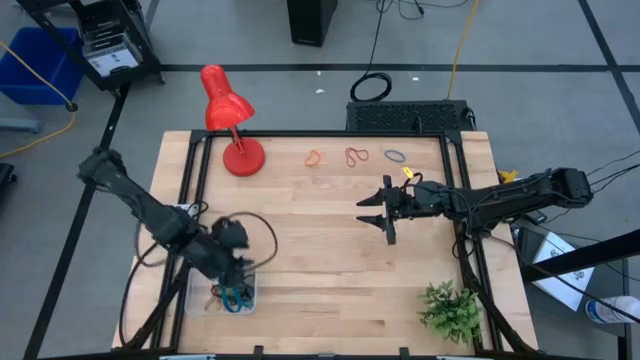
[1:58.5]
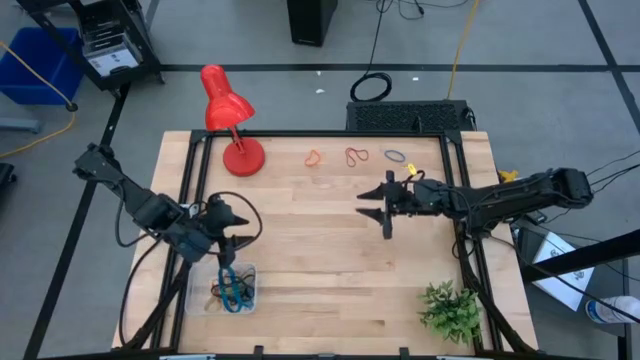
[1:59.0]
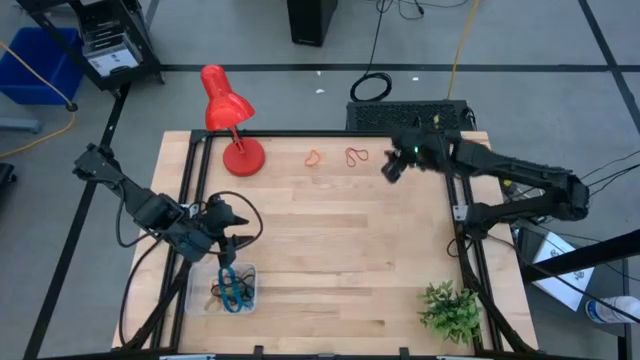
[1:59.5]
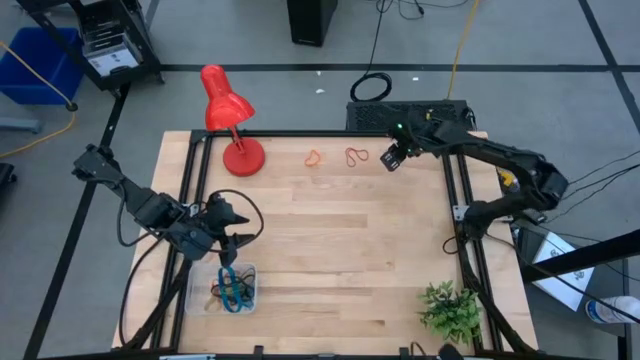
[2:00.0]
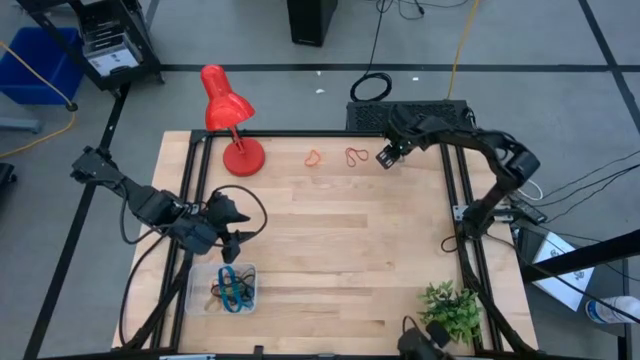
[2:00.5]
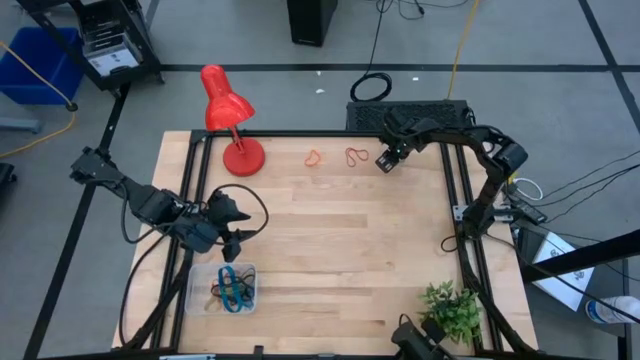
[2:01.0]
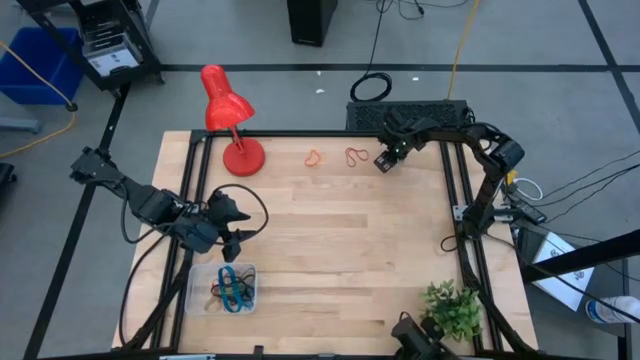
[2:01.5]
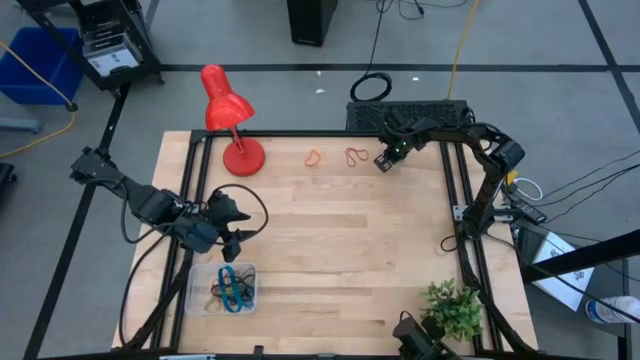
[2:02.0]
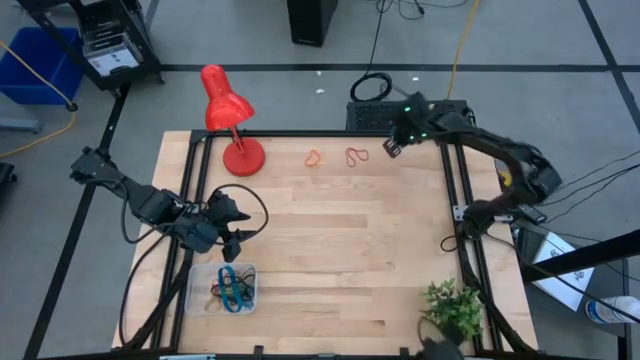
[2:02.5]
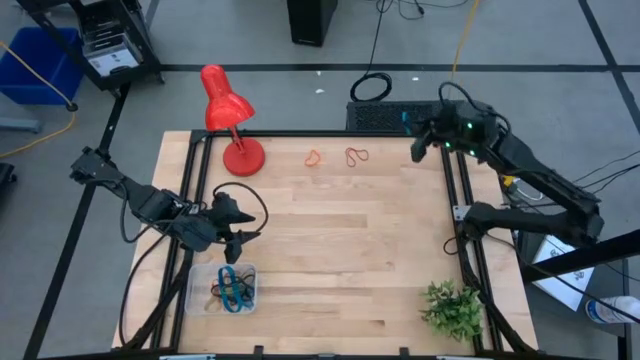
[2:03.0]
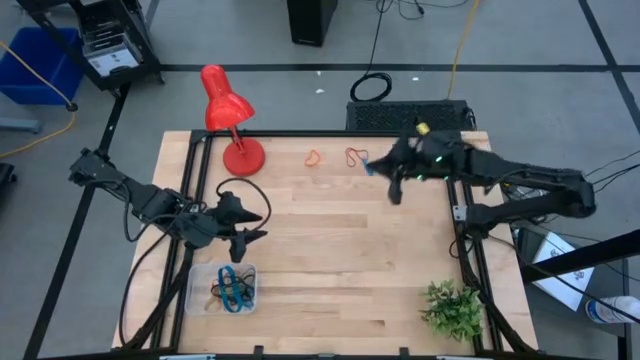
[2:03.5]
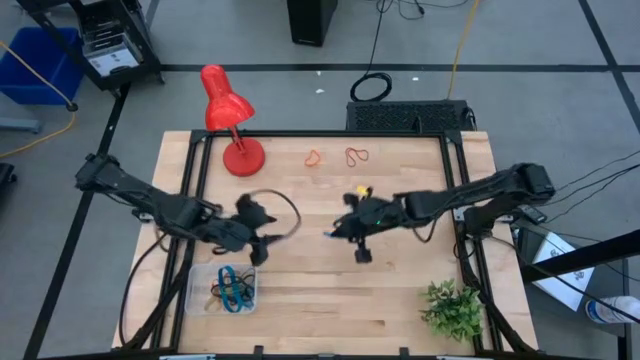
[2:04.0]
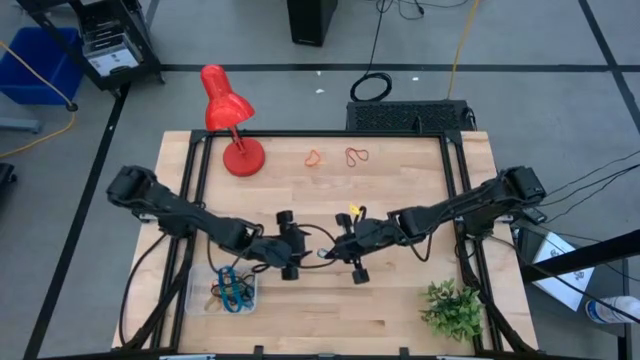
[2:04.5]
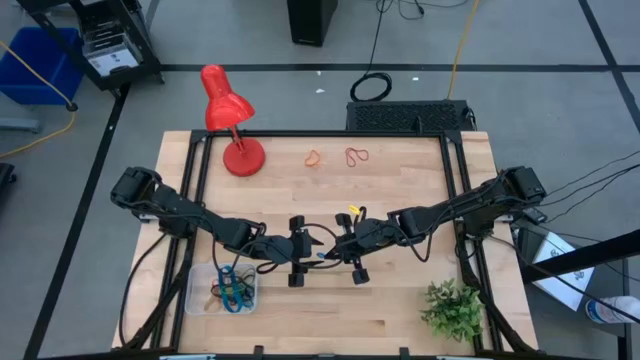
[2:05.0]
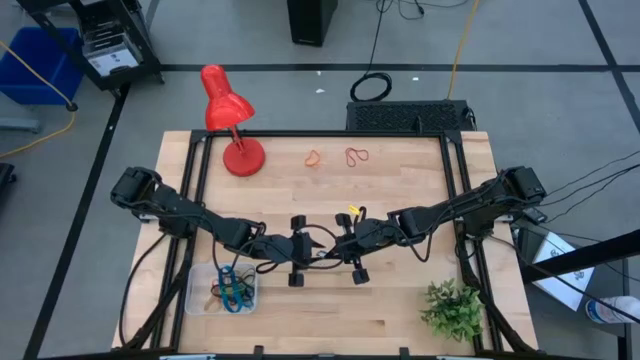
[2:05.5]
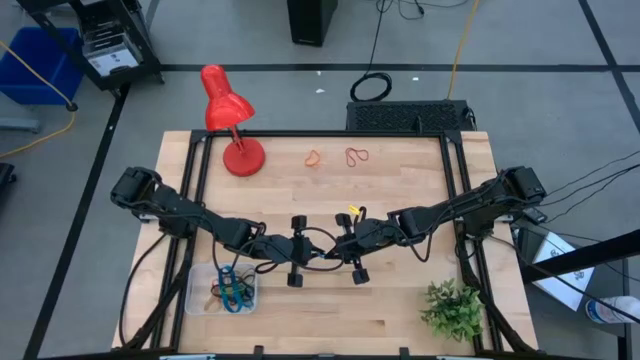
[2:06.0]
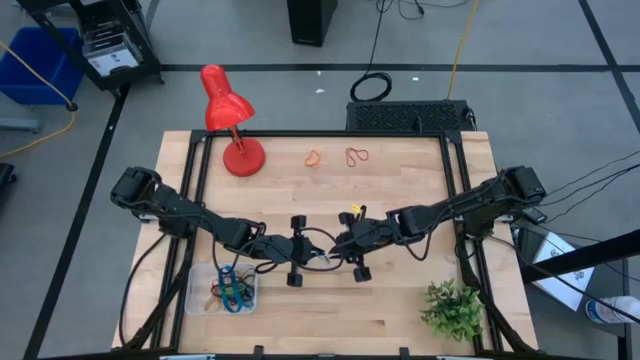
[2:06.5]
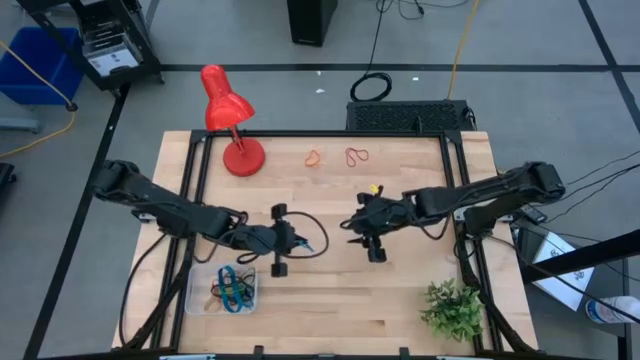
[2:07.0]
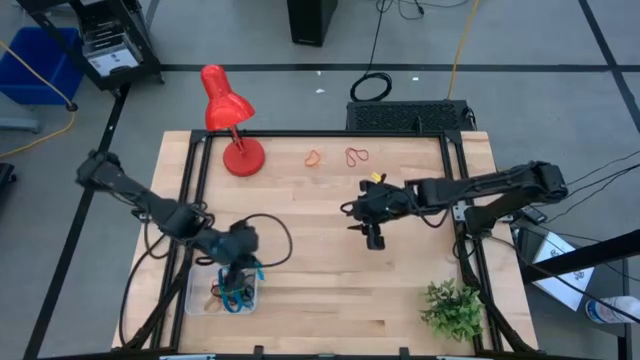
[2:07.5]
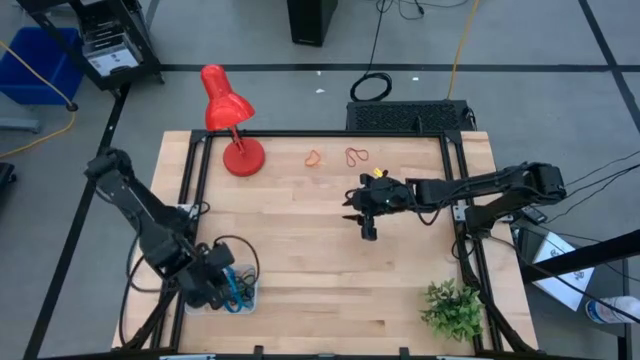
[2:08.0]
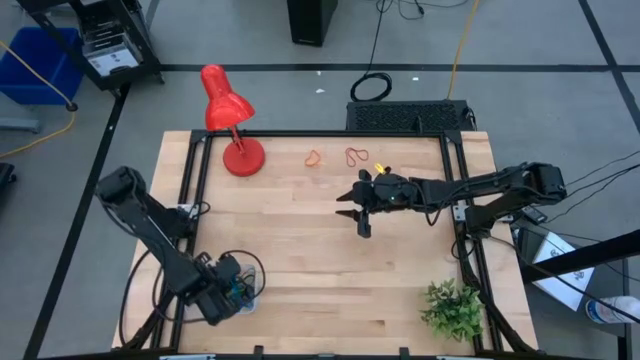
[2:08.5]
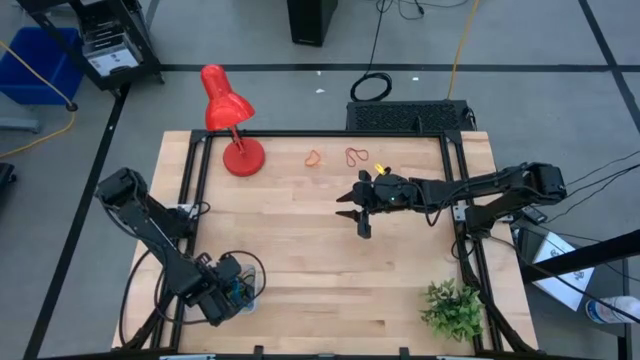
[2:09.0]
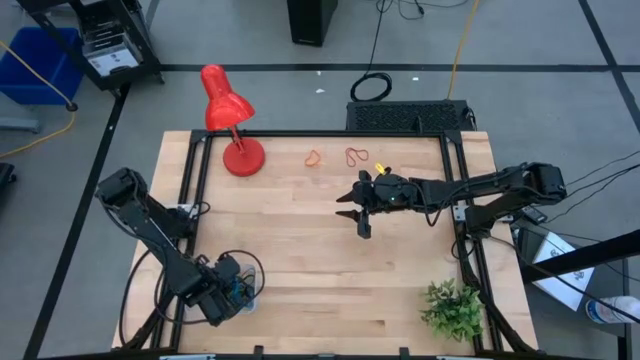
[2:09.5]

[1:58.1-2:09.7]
Task: Pick and place rubber bands into bin
Put the blue rubber band into the transparent bin

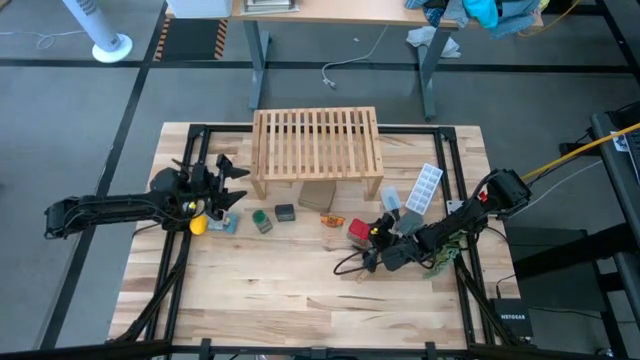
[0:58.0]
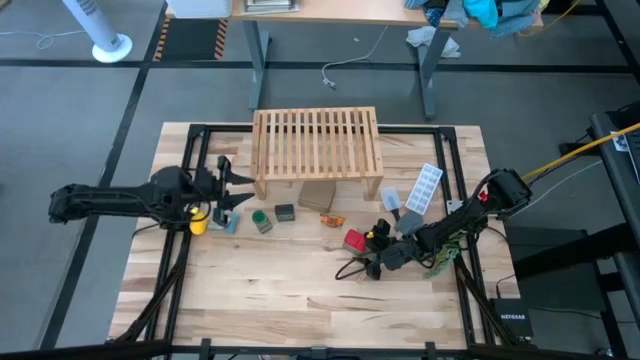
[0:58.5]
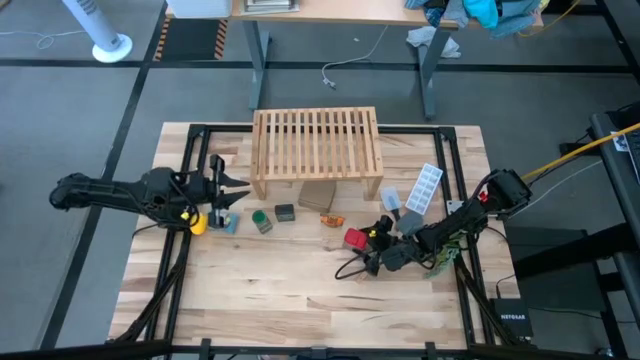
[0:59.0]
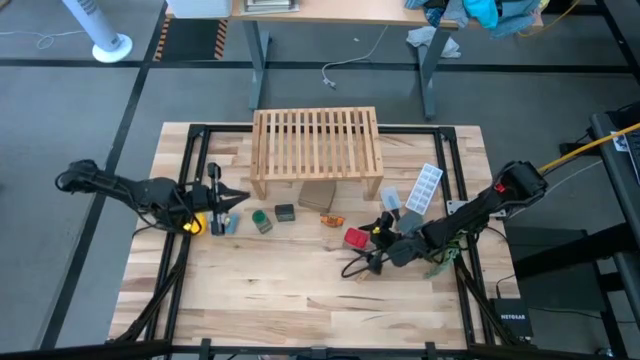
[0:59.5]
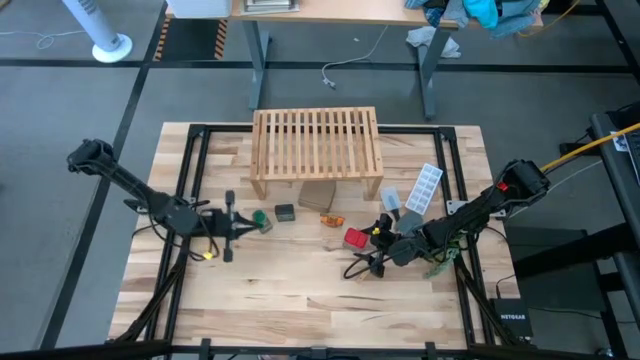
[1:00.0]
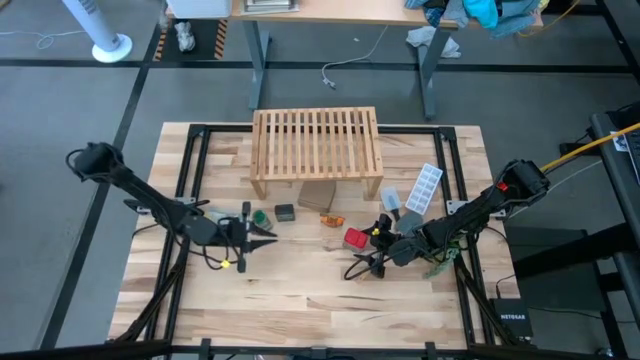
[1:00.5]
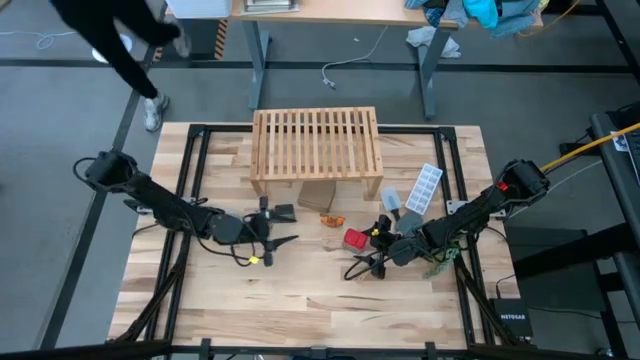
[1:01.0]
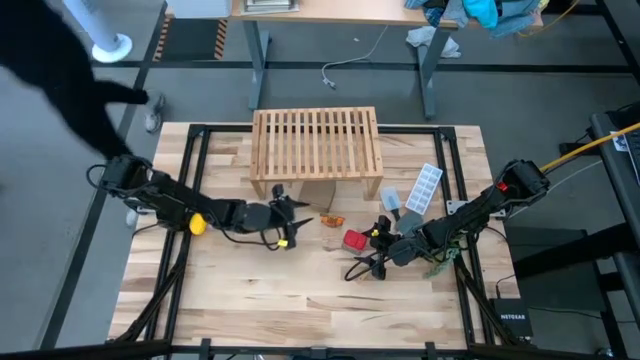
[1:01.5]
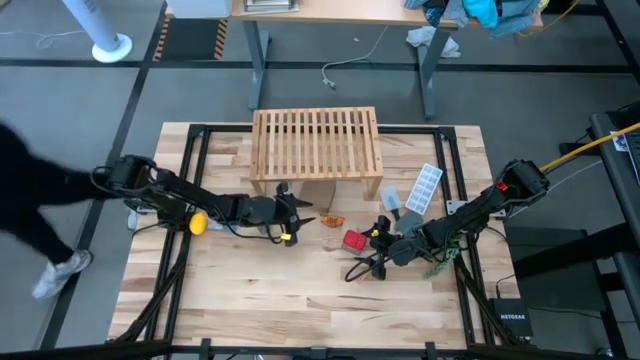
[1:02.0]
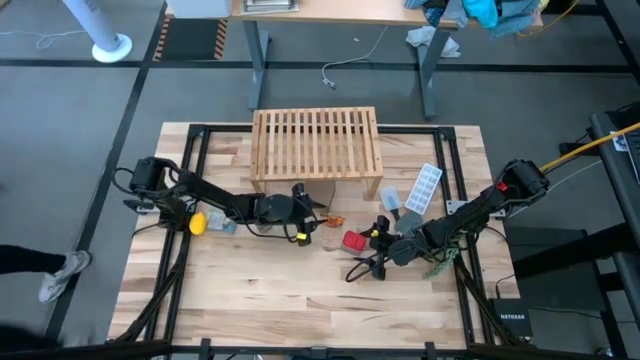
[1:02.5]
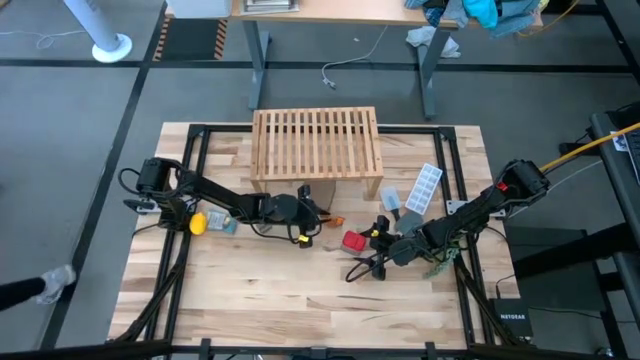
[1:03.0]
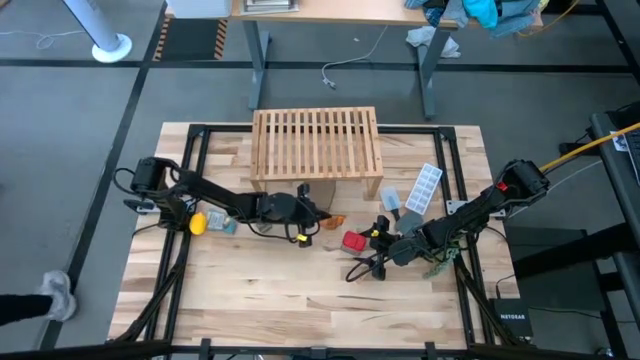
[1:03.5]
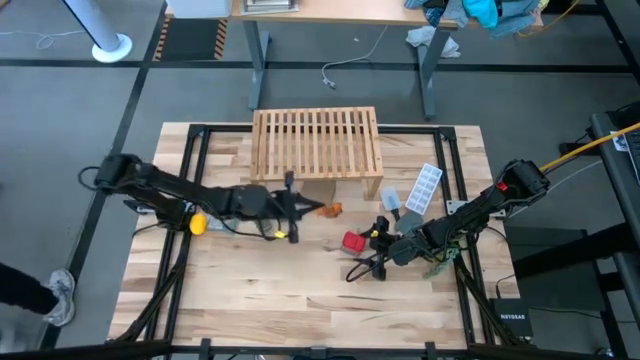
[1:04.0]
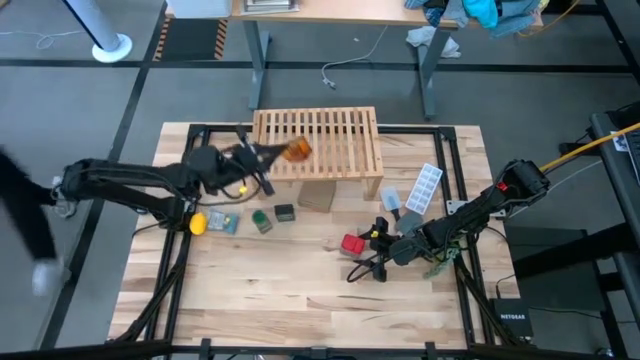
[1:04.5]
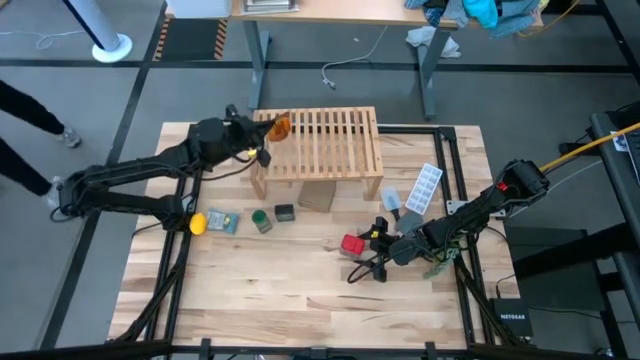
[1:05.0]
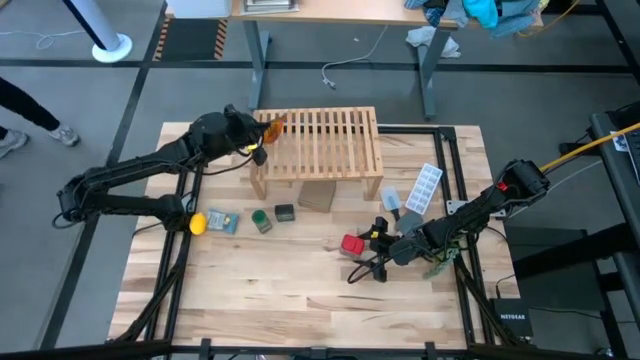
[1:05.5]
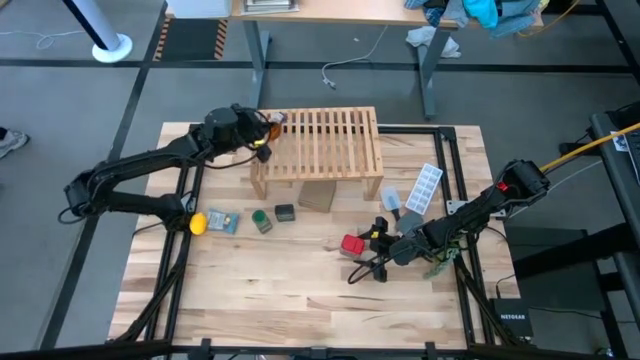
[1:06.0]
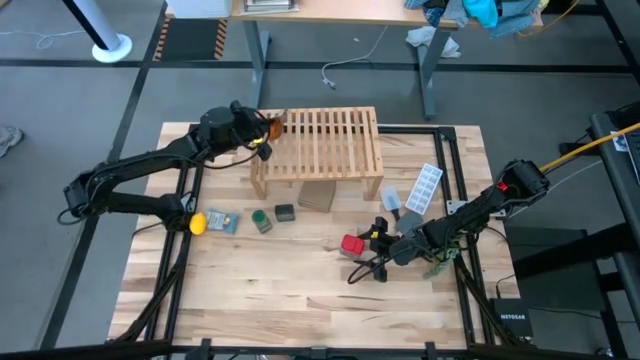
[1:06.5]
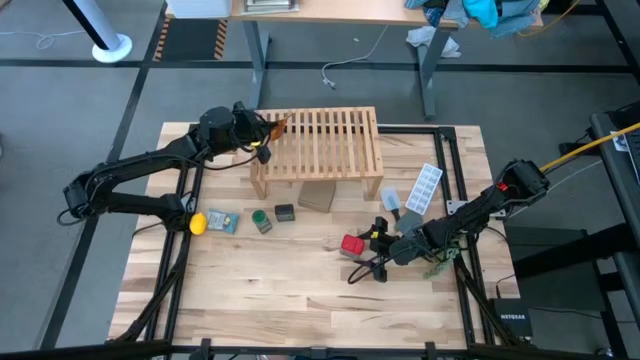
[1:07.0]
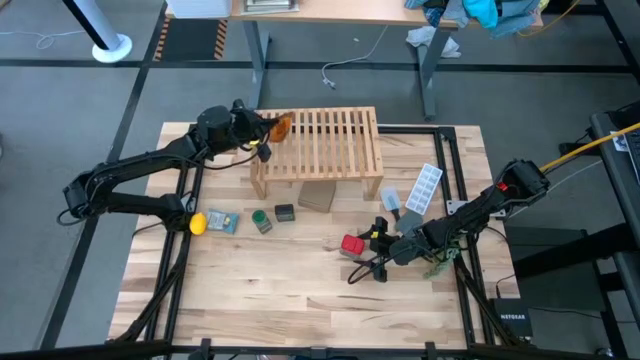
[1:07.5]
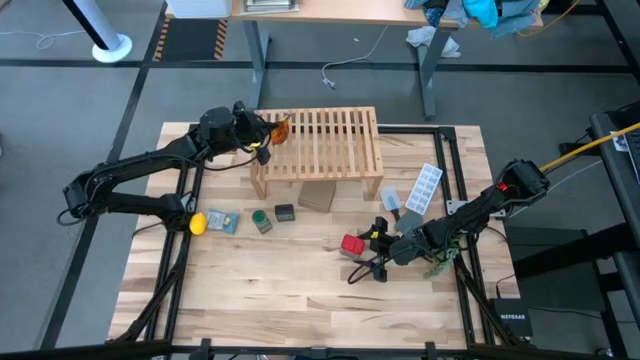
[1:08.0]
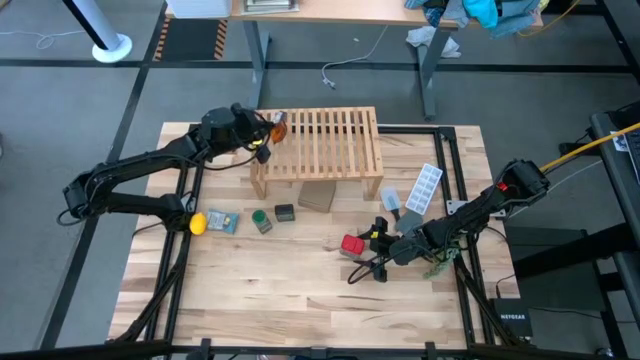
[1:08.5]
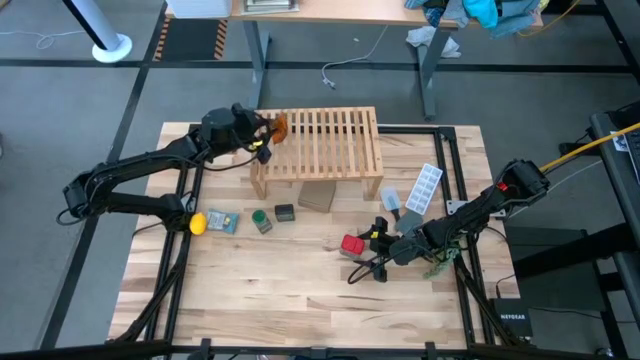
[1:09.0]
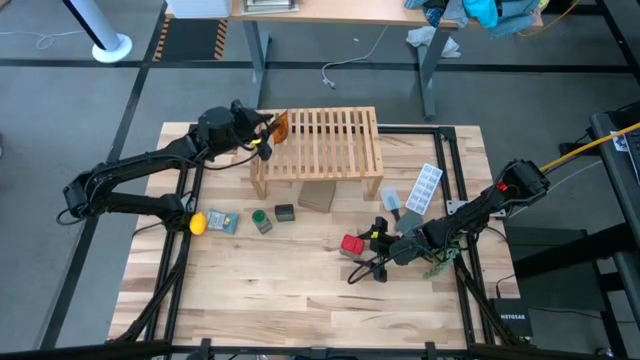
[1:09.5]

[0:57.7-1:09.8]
Task: Shelf spices
Put the orange seasoning pack on the shelf
